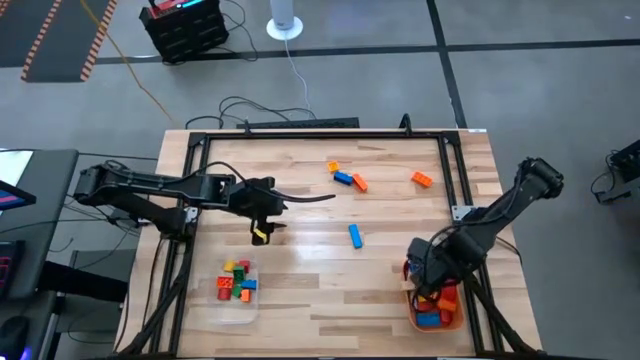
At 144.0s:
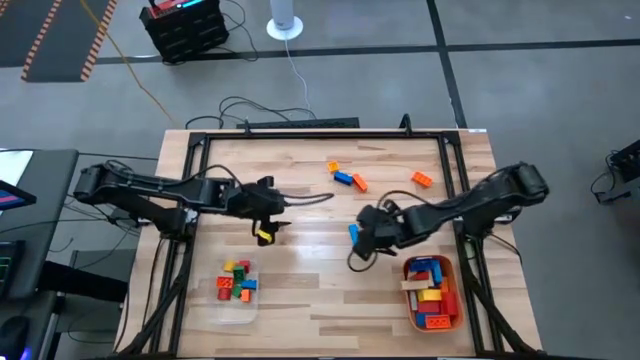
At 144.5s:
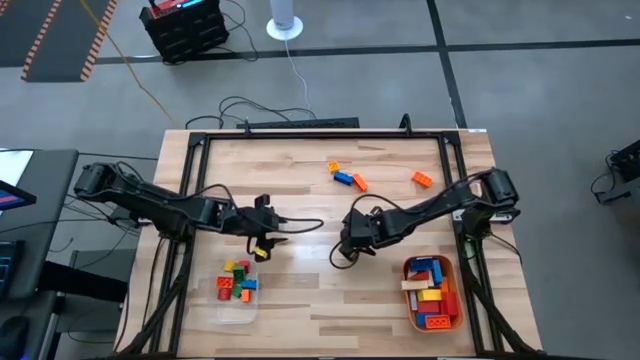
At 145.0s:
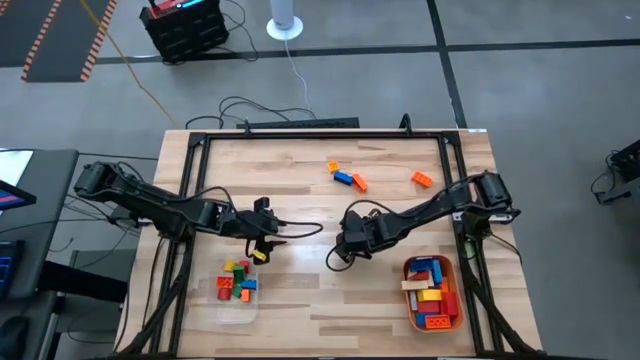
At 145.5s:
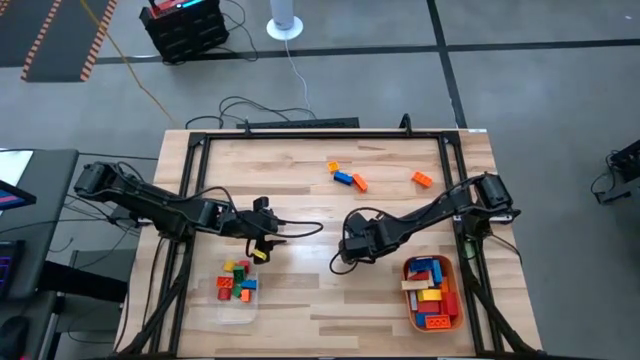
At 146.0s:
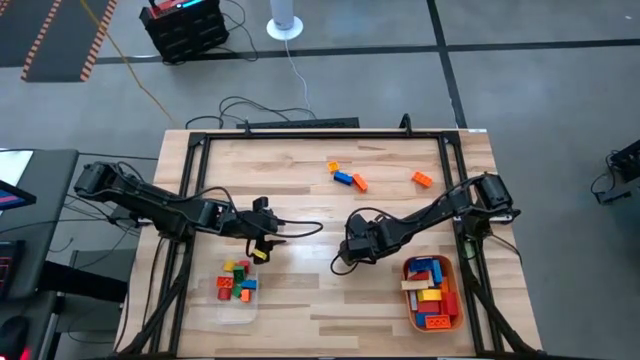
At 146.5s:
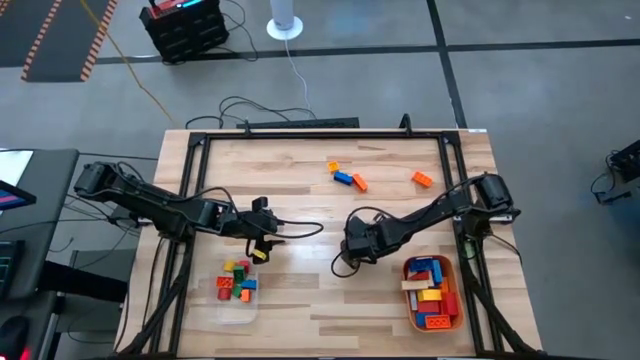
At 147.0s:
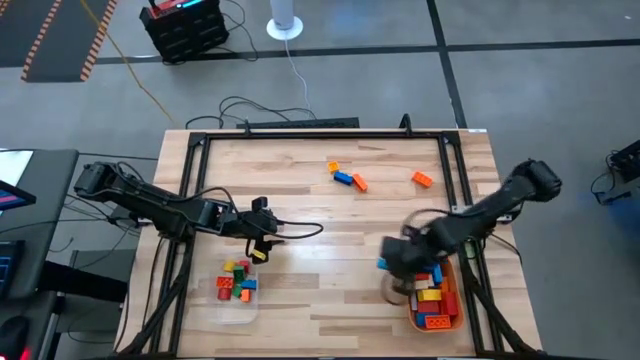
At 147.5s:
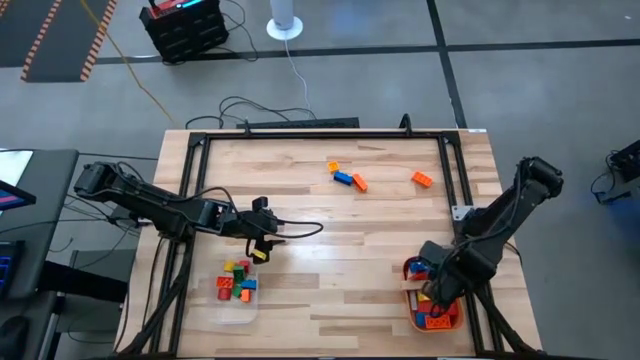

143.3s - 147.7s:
Task: Sort blocks by size
Put the large blue block into the orange bin

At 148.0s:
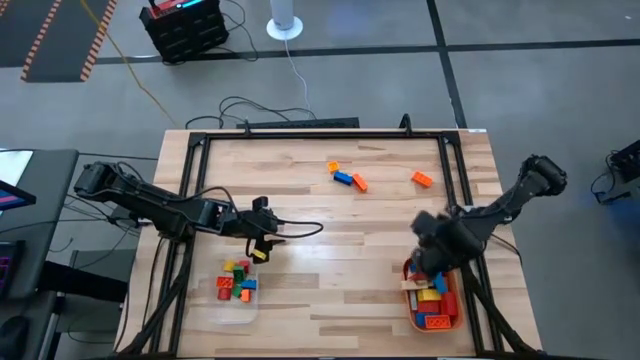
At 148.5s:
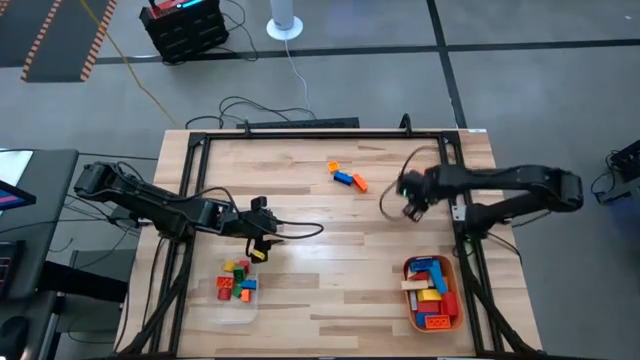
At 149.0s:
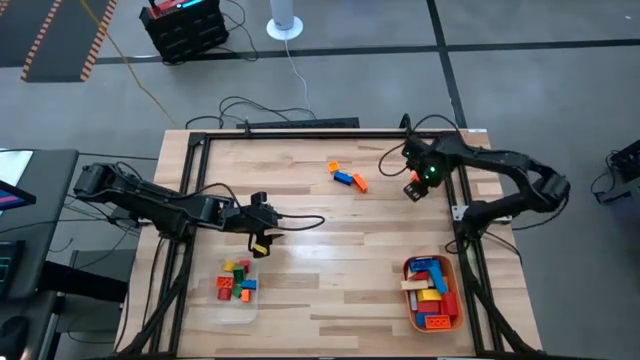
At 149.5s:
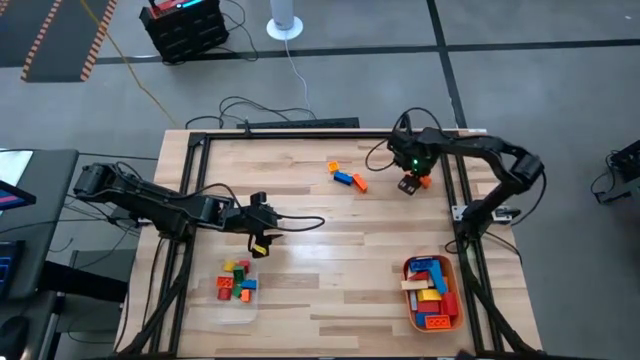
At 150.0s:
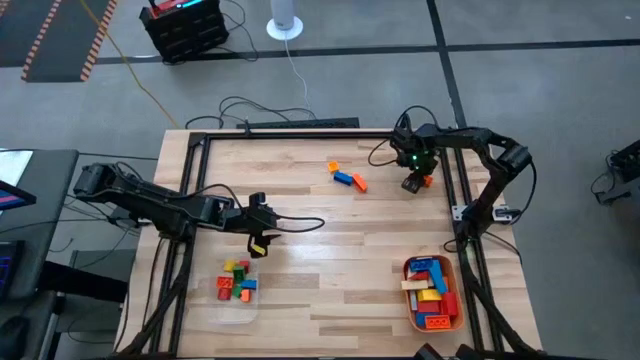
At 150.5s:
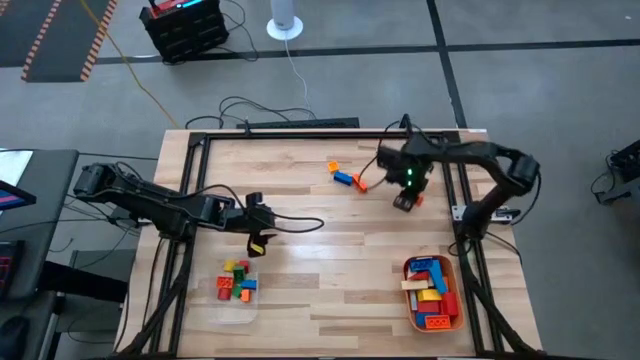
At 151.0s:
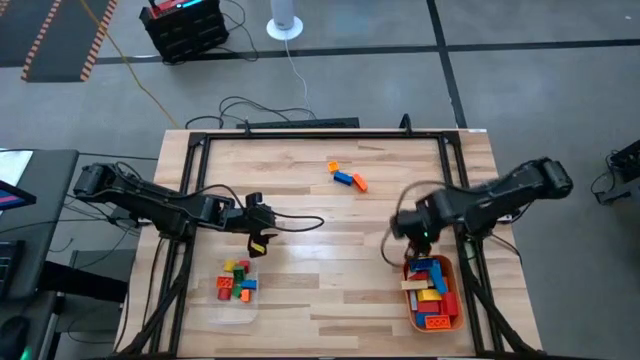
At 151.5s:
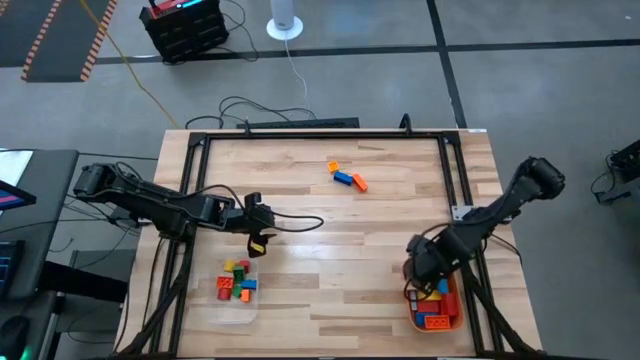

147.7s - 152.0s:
Put the large orange game piece into the orange bin

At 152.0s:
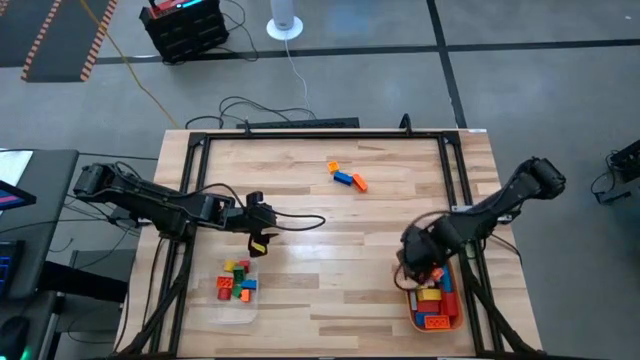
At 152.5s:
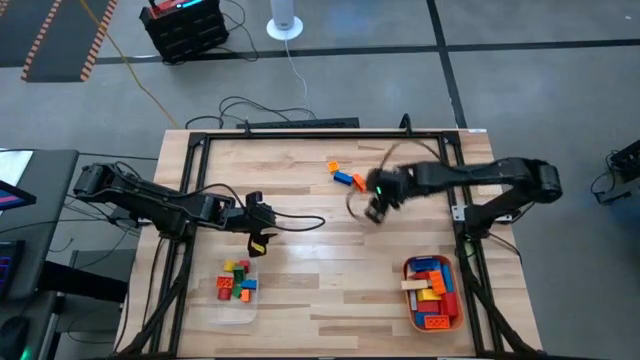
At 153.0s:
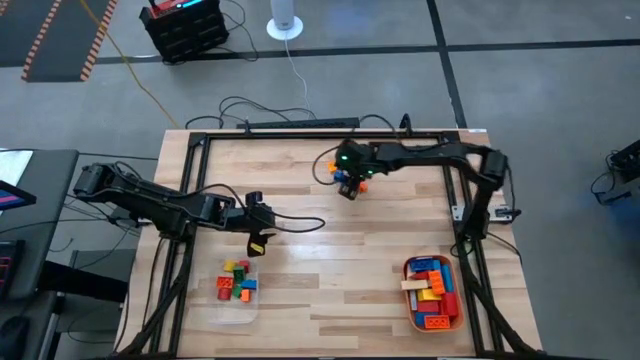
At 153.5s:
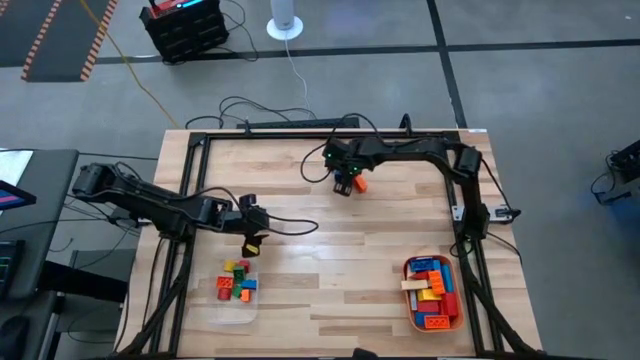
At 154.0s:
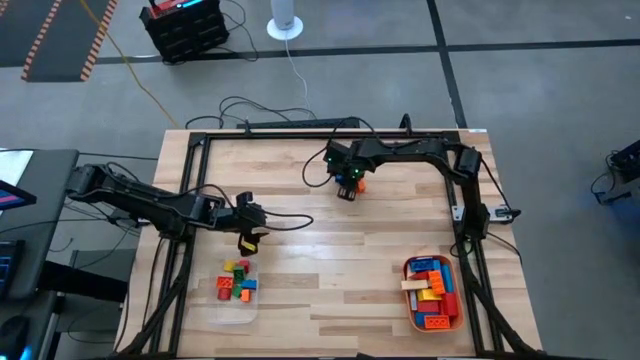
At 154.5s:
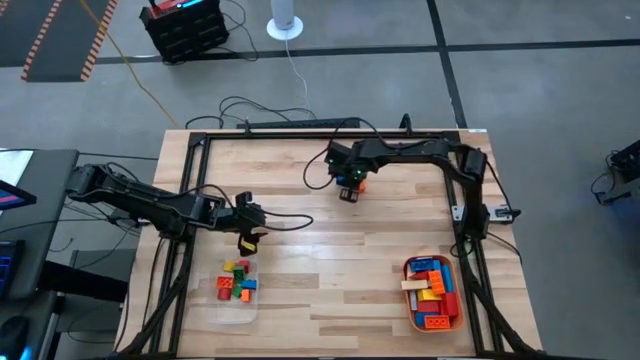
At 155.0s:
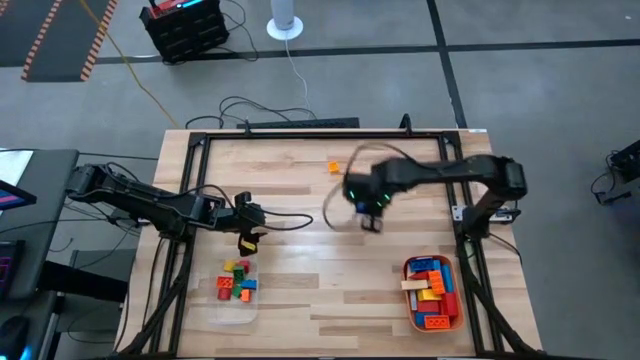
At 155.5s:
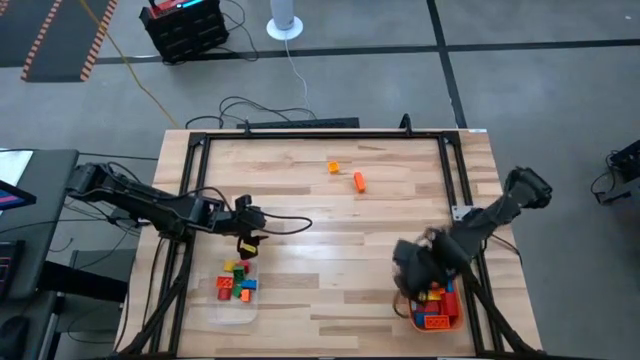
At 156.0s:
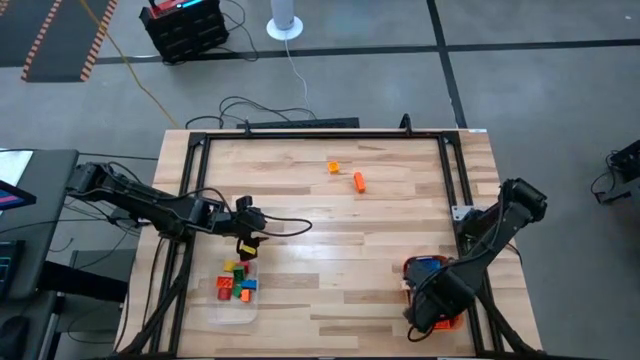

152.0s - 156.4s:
Put the large blue game piece into the orange bin

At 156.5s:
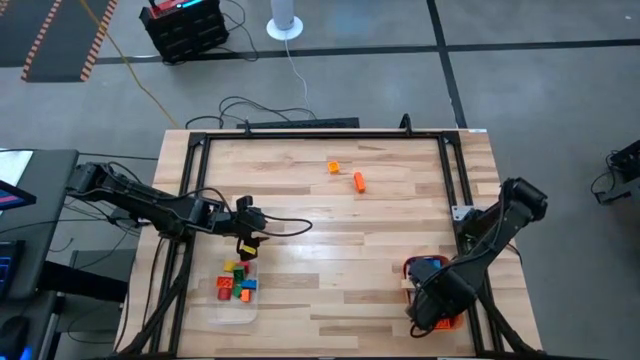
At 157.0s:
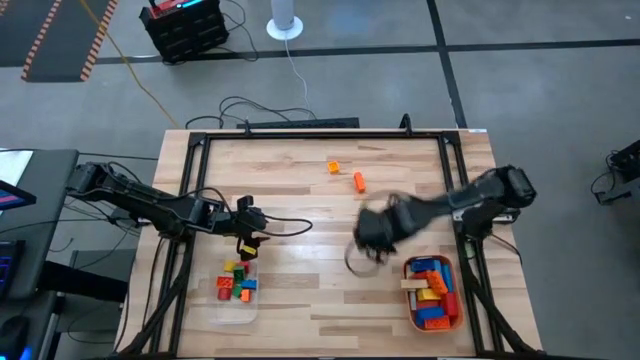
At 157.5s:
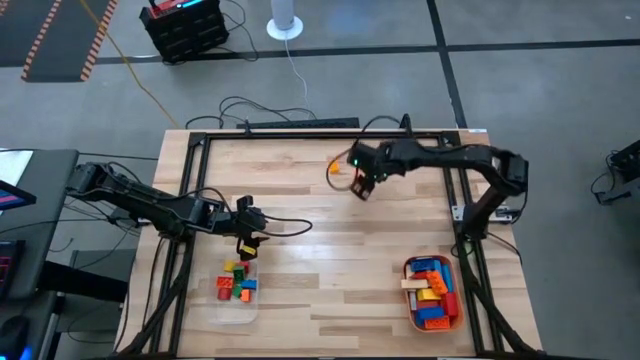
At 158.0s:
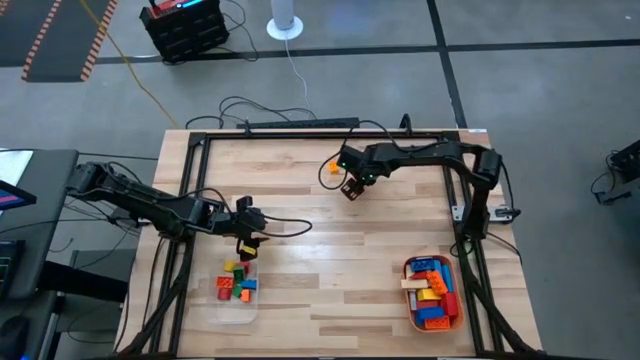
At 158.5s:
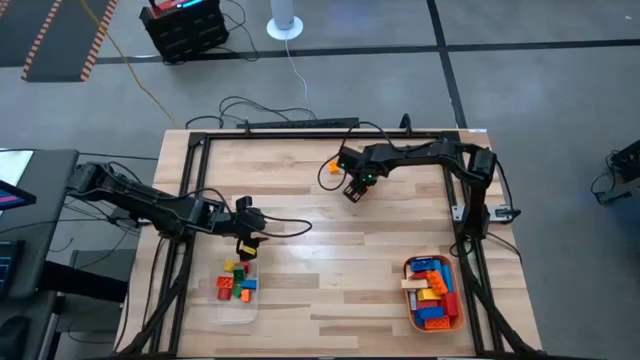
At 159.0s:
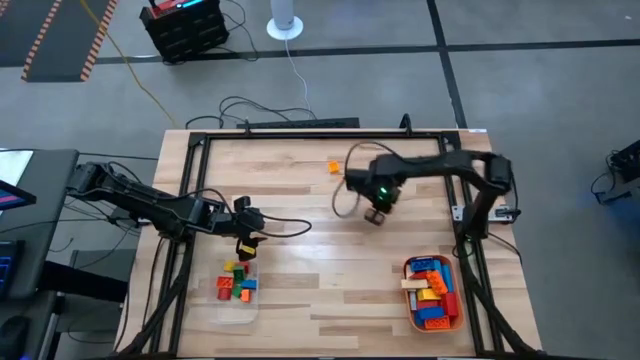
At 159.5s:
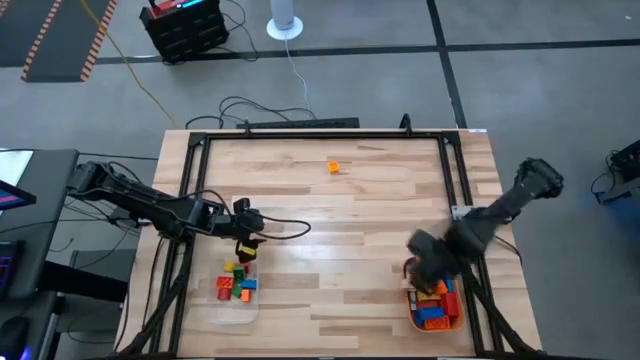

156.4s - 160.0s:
Put the large orange game piece into the orange bin

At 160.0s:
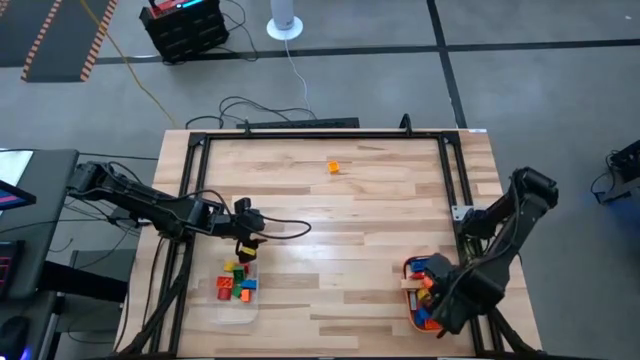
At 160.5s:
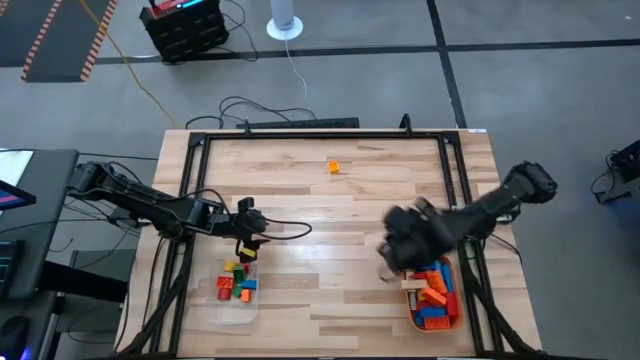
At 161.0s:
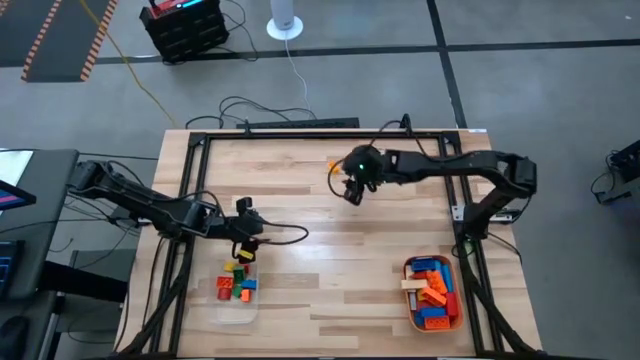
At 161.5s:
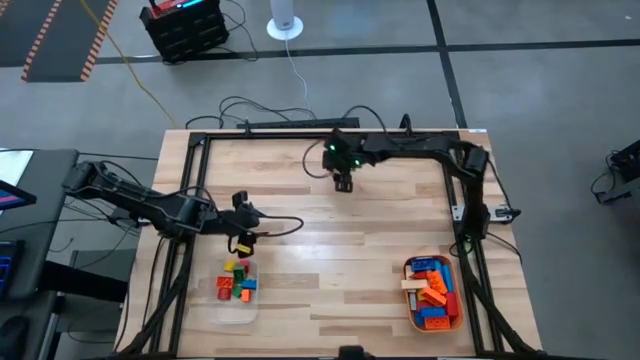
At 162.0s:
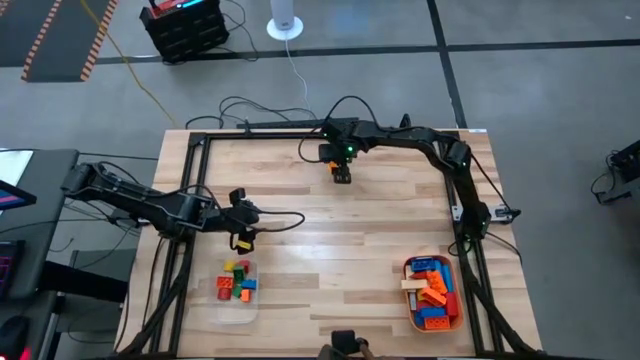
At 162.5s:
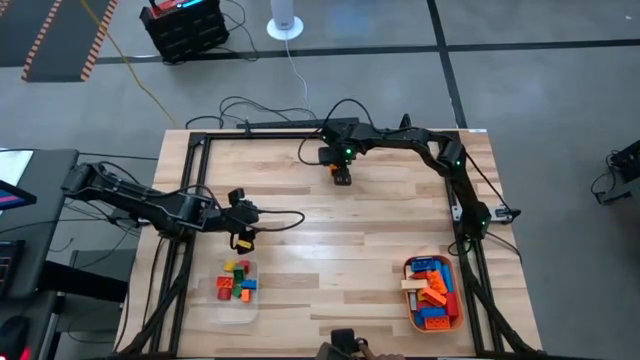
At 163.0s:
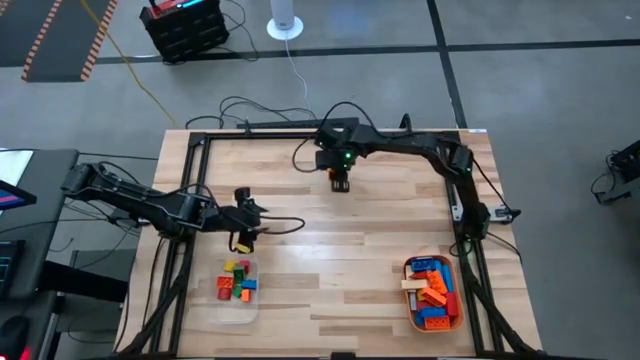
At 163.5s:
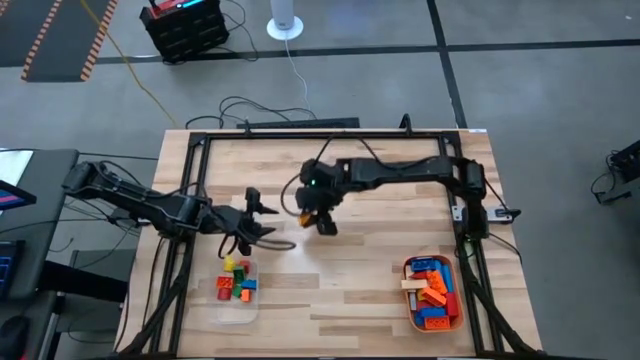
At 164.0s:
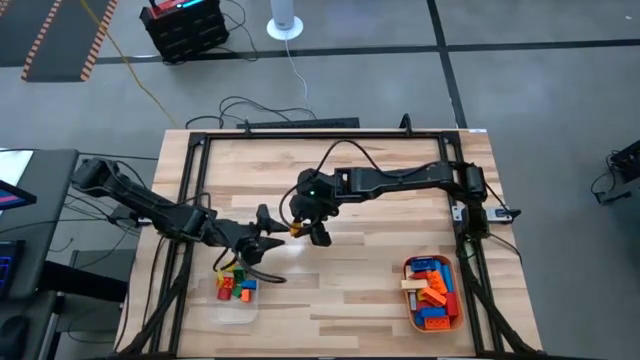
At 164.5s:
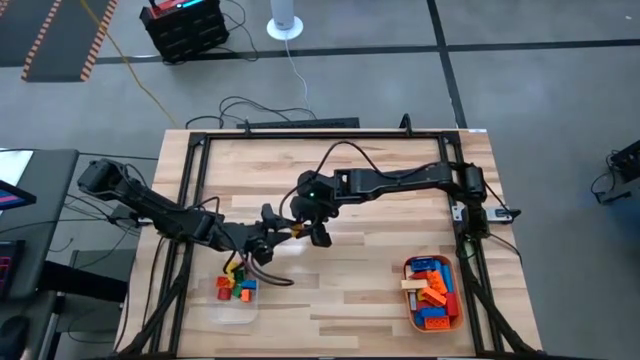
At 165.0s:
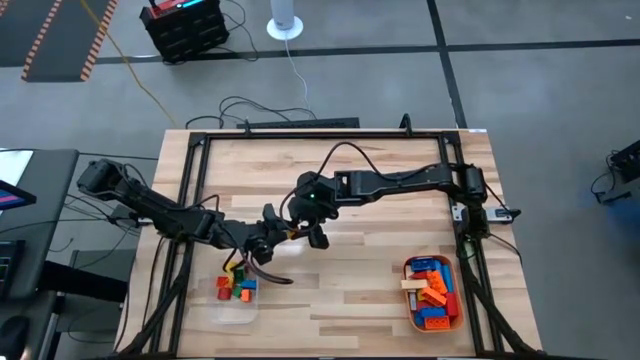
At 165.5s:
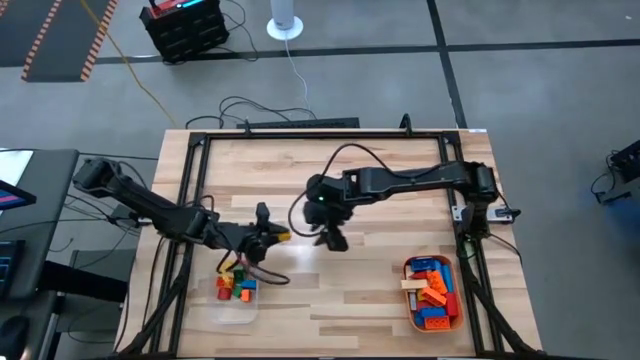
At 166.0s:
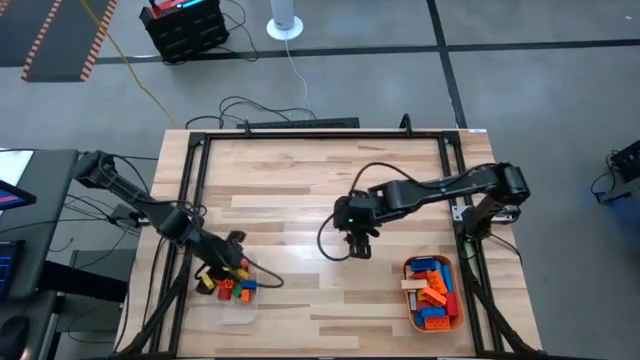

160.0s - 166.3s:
Put the small yellow game piece into the transparent bin
